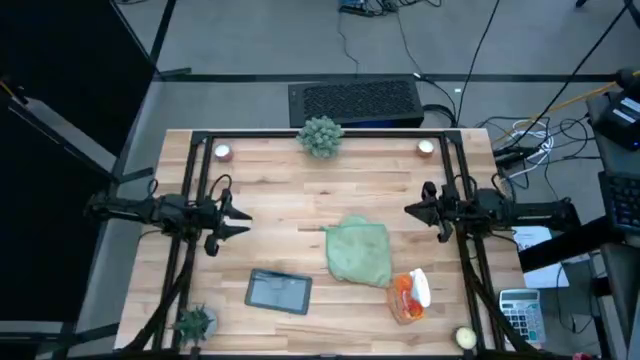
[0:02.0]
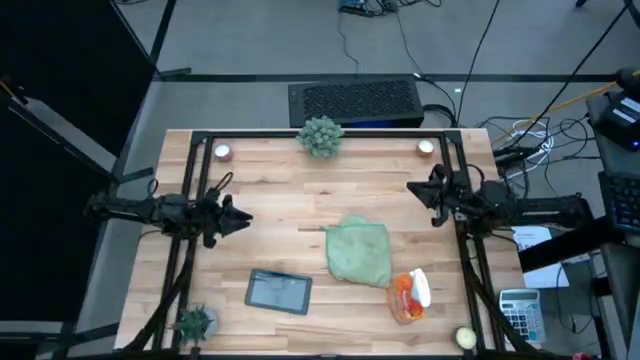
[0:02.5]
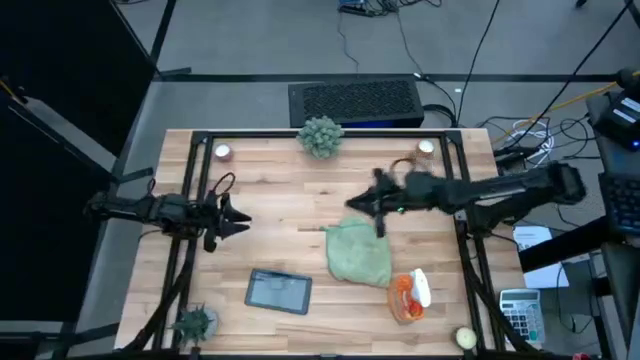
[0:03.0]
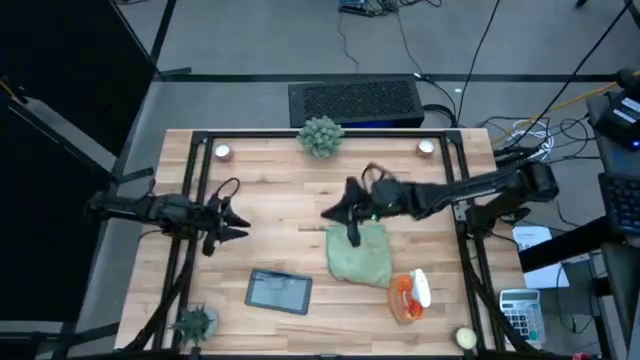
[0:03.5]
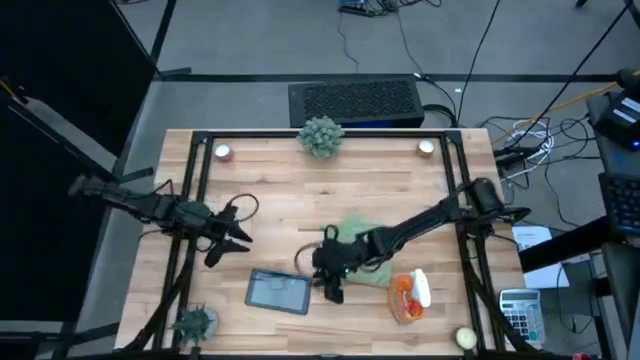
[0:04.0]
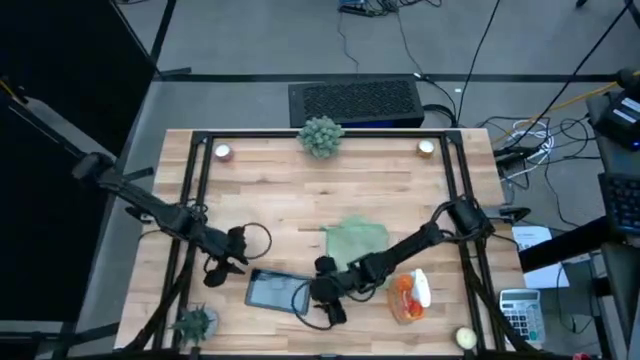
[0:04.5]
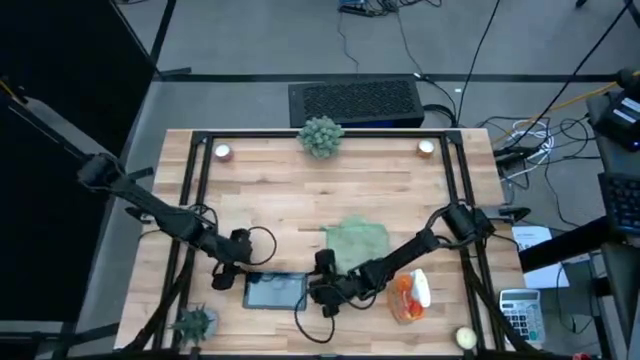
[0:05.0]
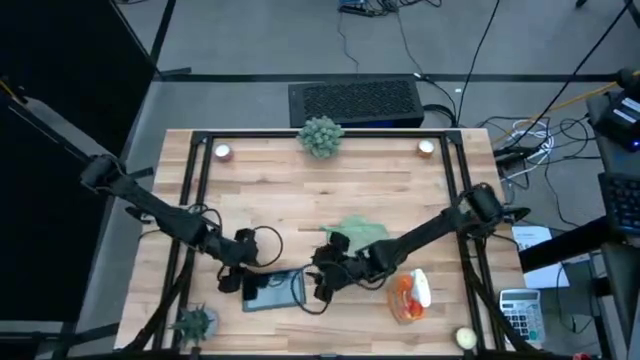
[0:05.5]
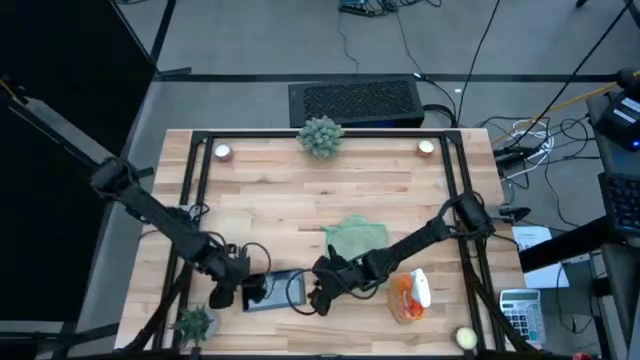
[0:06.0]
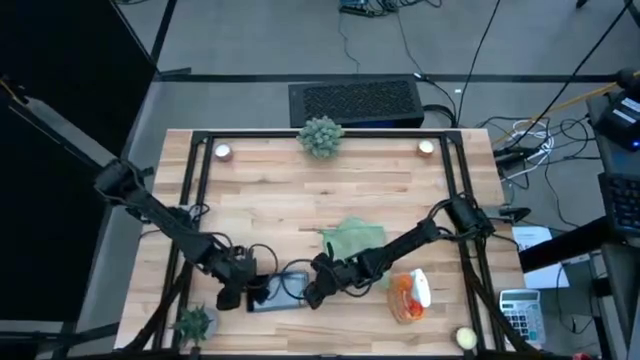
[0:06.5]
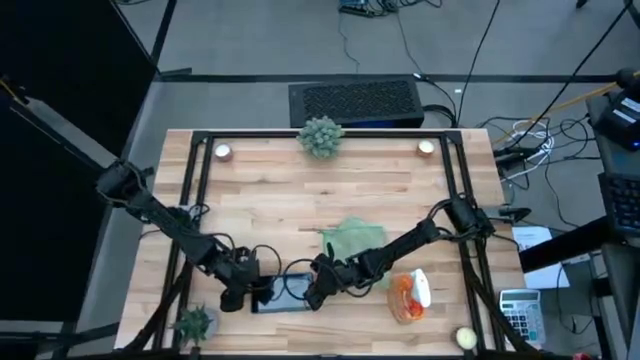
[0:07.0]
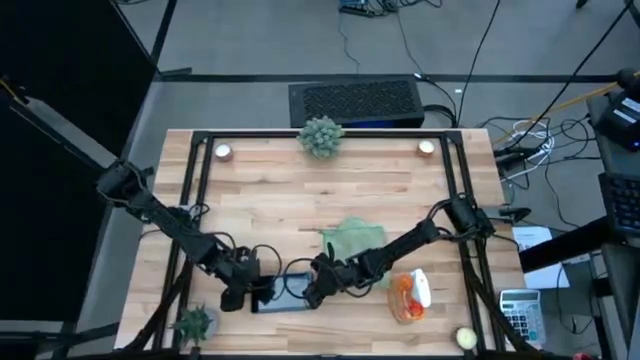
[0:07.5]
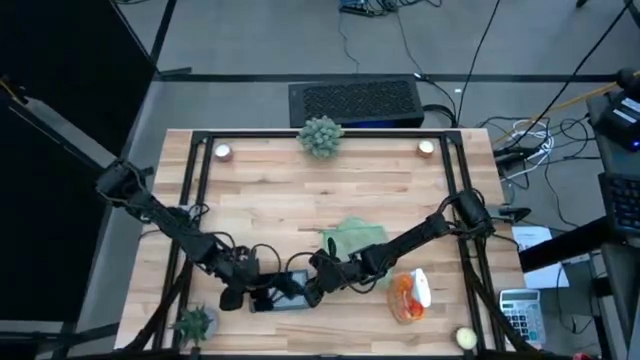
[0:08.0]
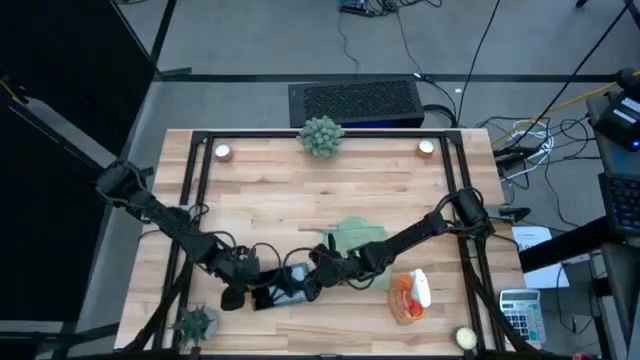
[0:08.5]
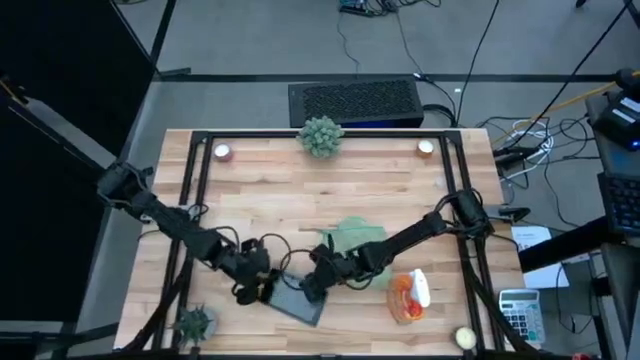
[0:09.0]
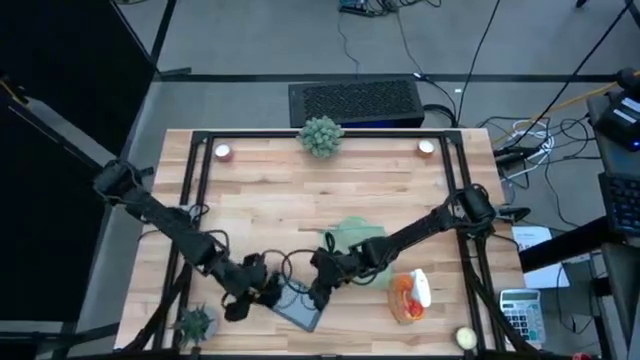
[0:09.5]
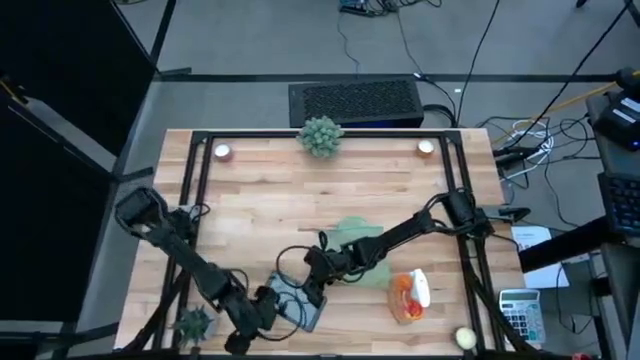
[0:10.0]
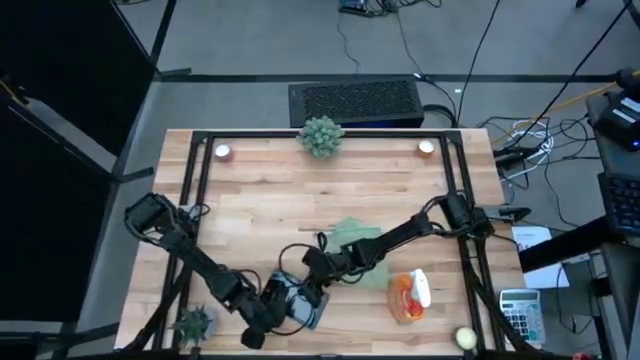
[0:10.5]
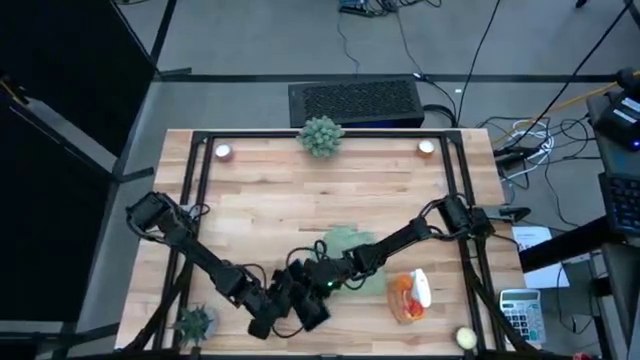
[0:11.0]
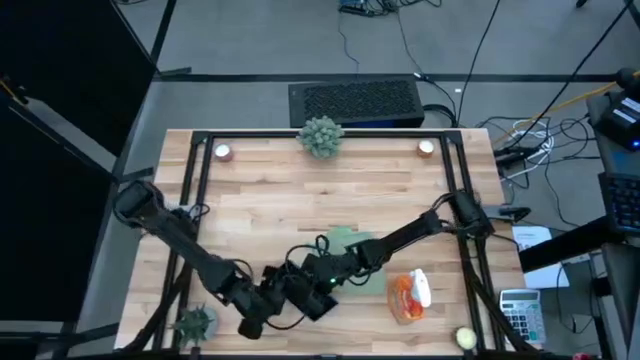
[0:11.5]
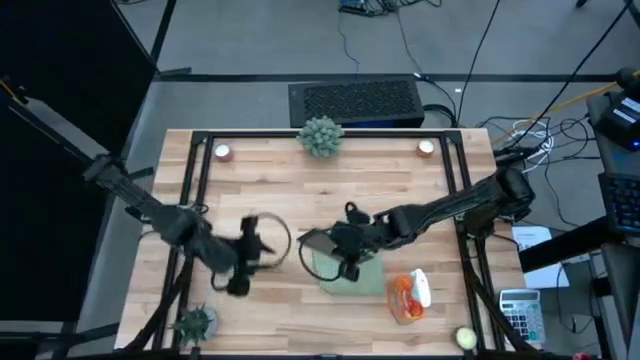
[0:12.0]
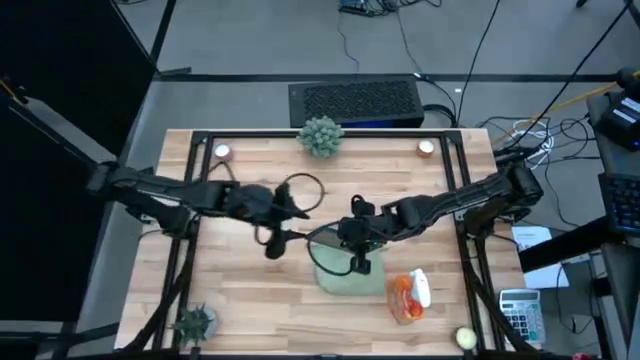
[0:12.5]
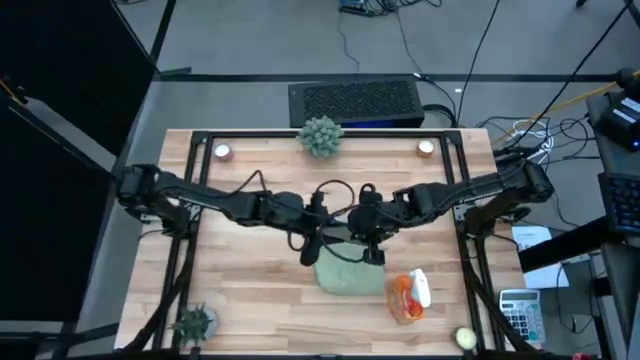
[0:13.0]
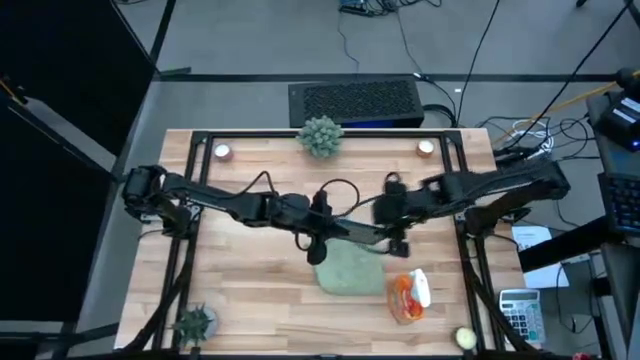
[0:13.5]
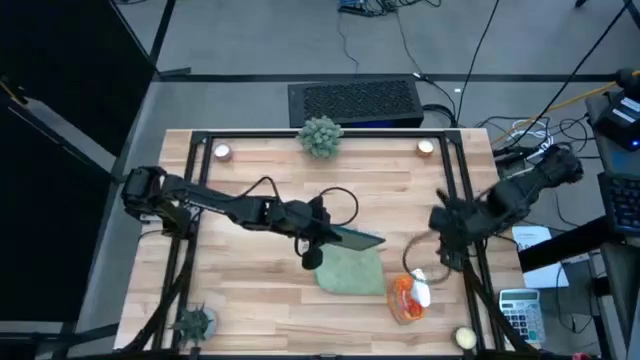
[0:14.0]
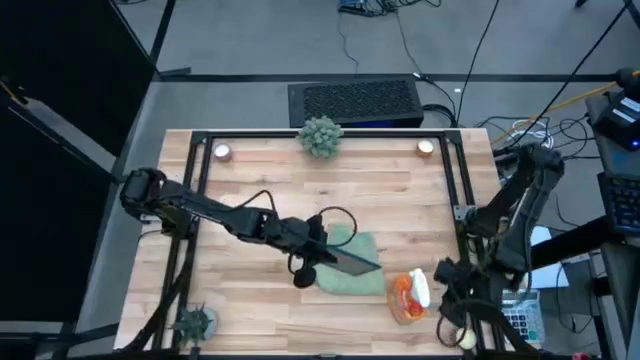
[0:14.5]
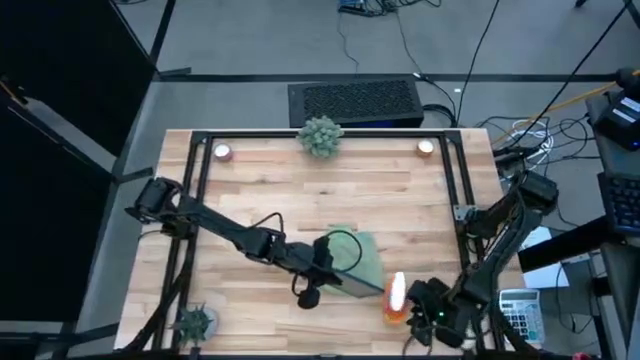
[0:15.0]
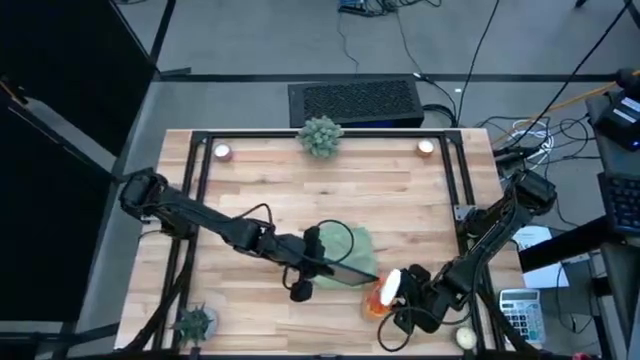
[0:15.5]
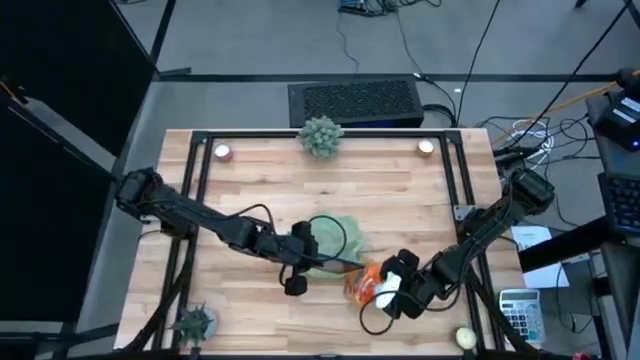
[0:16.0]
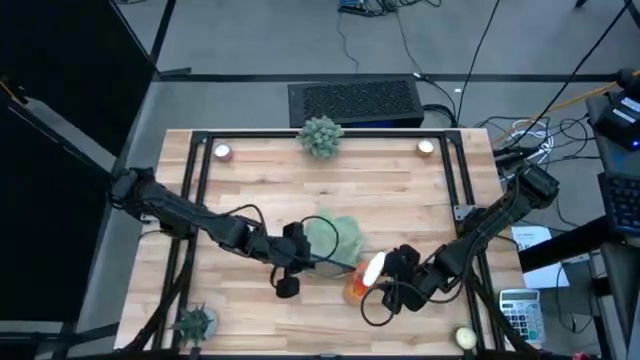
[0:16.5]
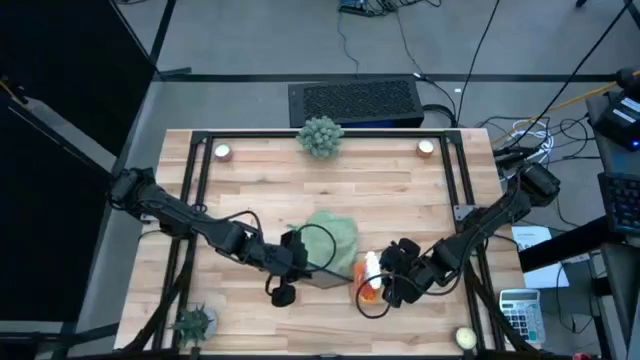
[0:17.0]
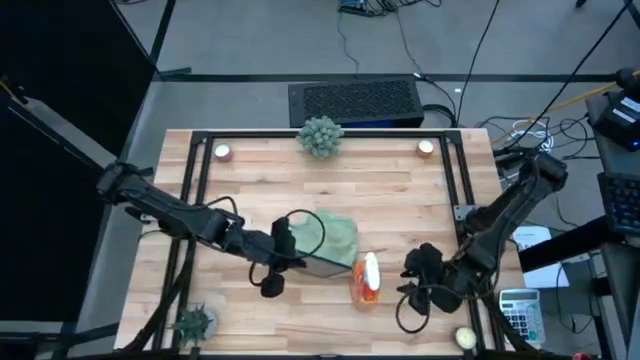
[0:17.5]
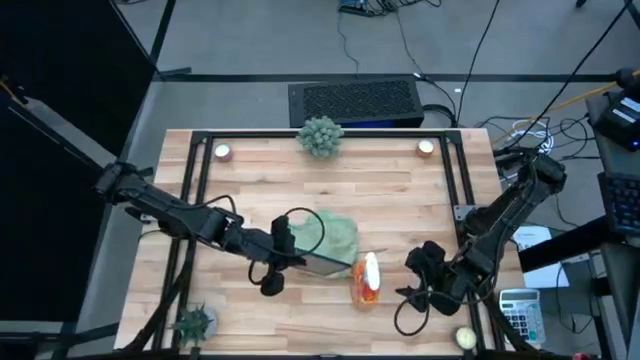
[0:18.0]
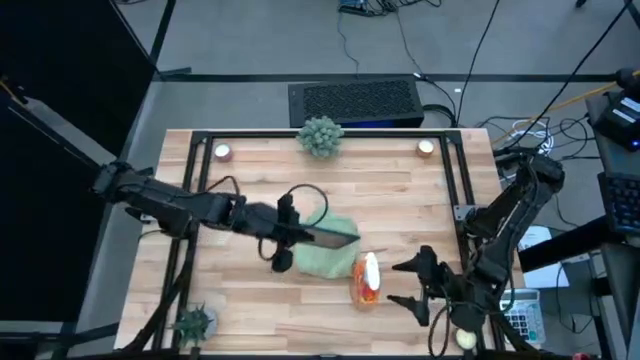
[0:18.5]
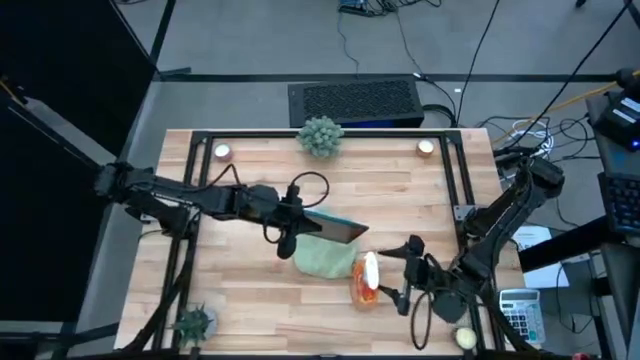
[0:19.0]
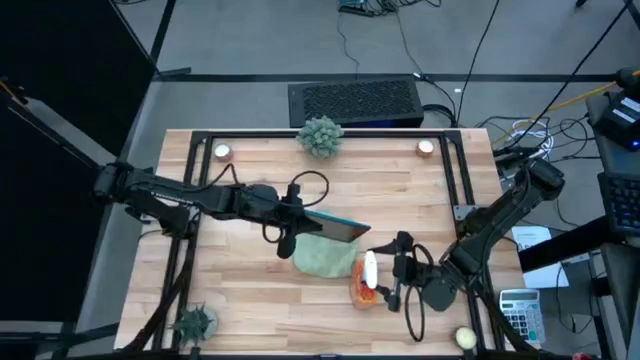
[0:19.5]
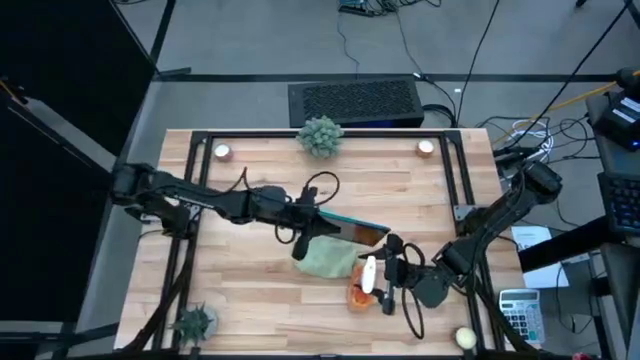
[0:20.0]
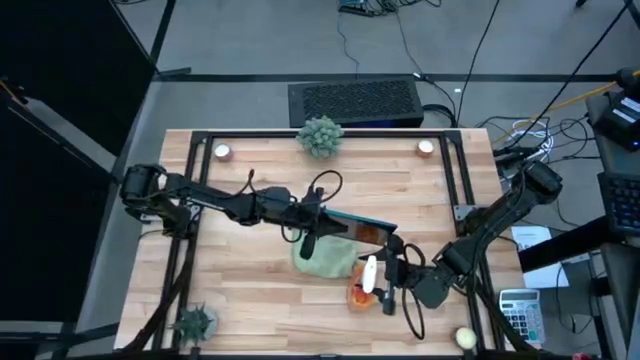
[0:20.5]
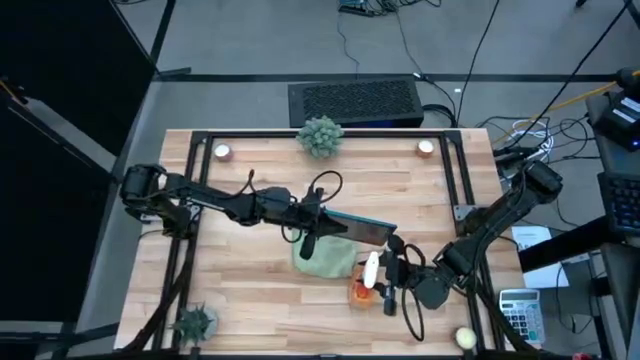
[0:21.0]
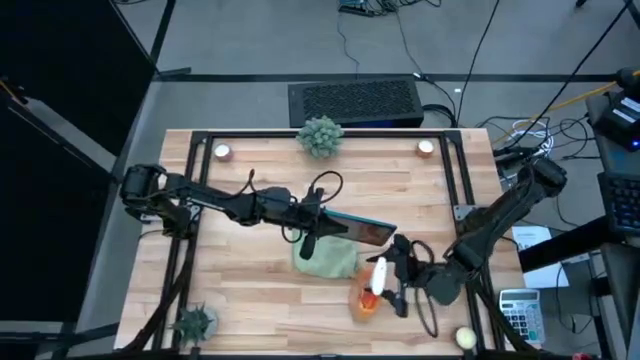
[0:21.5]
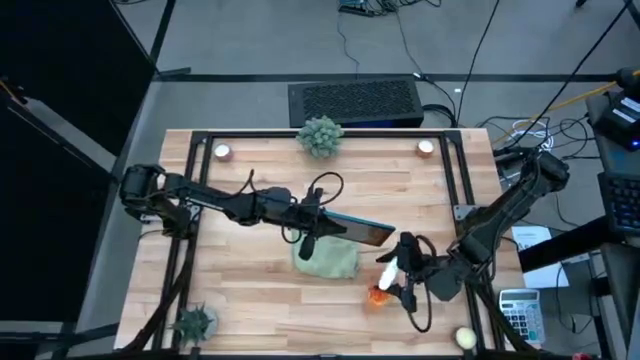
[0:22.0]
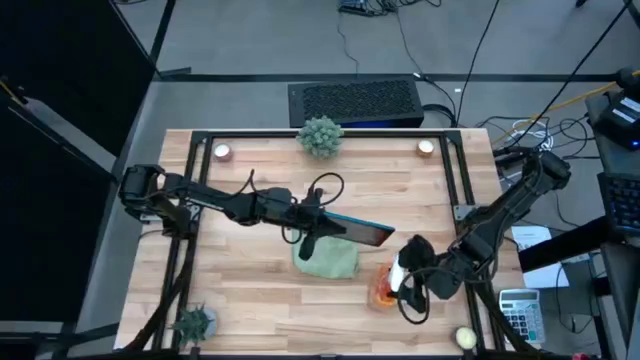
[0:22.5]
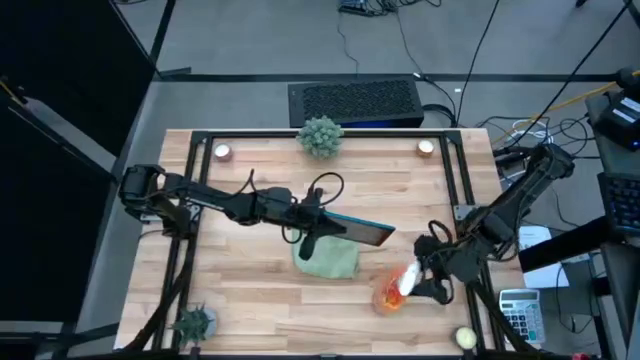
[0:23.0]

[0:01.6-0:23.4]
Task: Apply microfiber cloth
Spray the cellphone using the spray bottle
